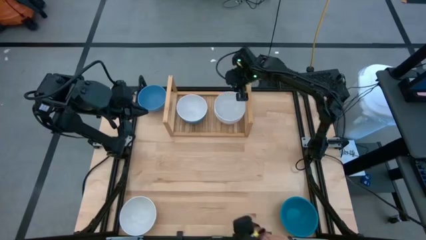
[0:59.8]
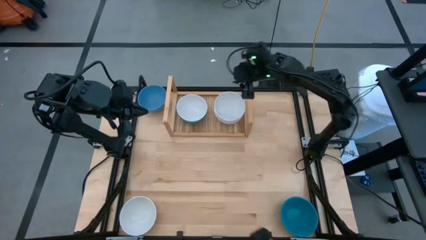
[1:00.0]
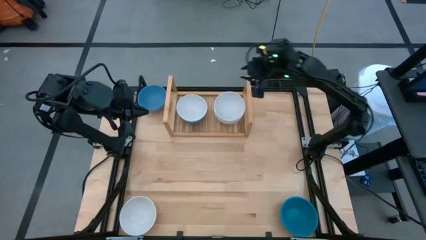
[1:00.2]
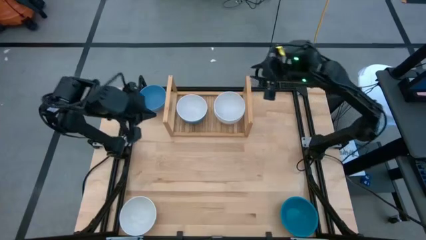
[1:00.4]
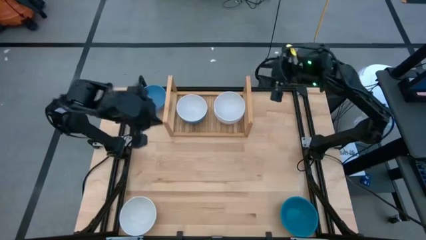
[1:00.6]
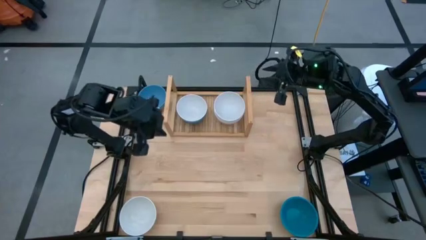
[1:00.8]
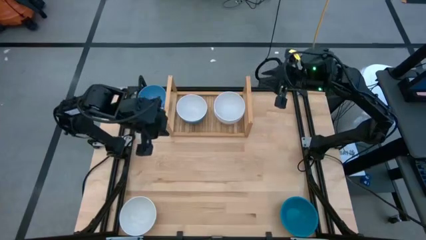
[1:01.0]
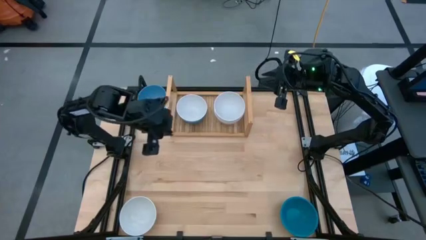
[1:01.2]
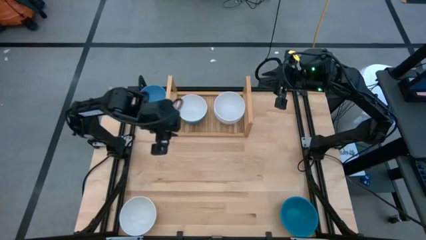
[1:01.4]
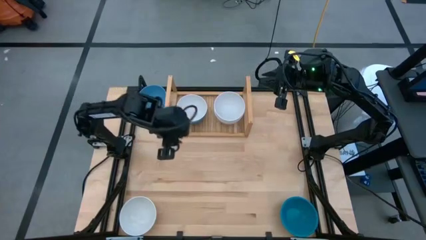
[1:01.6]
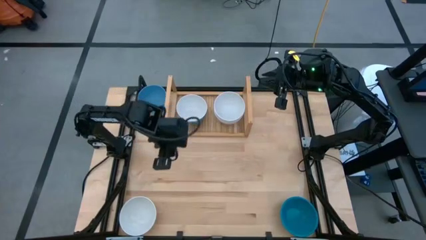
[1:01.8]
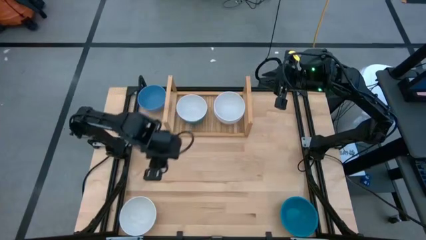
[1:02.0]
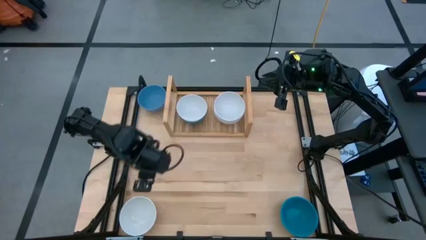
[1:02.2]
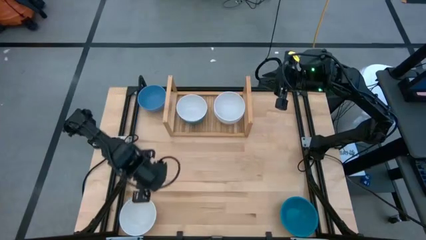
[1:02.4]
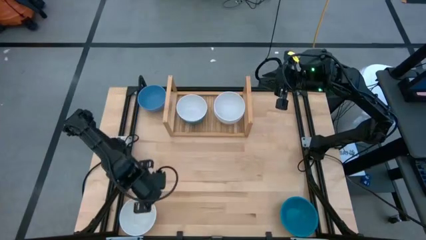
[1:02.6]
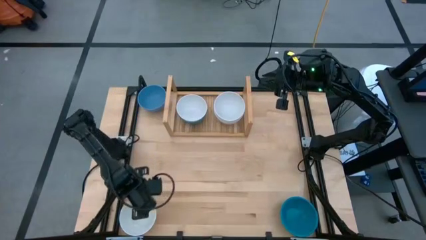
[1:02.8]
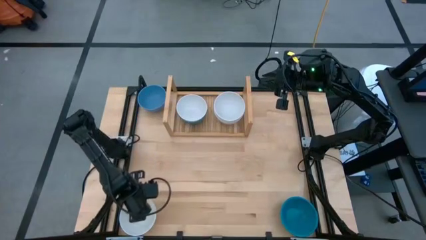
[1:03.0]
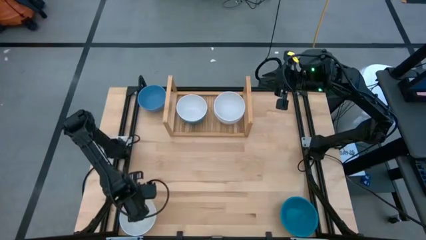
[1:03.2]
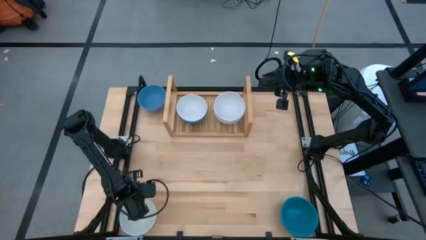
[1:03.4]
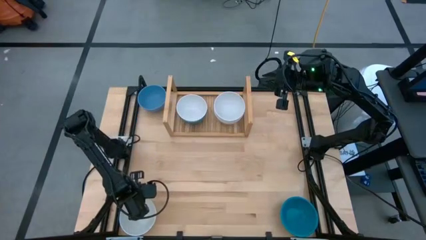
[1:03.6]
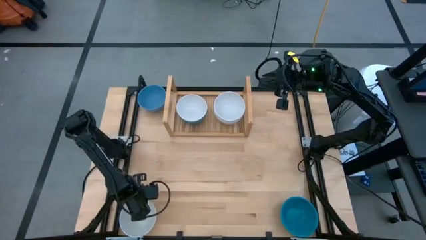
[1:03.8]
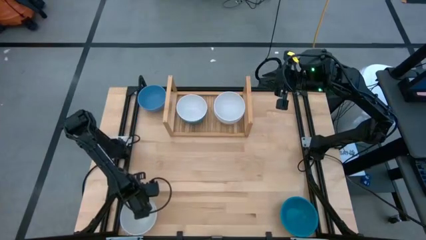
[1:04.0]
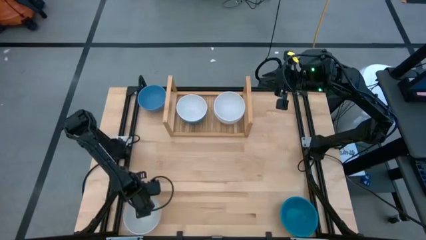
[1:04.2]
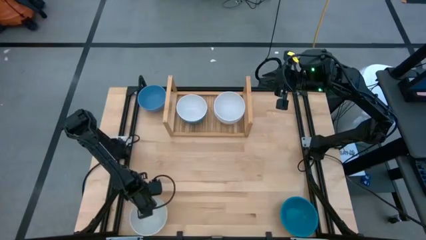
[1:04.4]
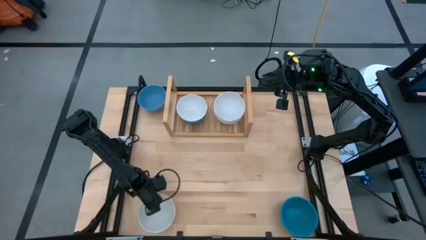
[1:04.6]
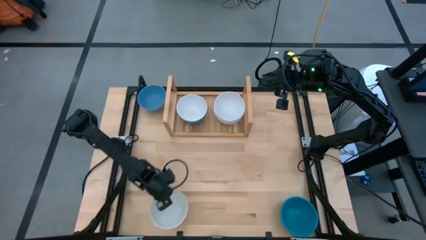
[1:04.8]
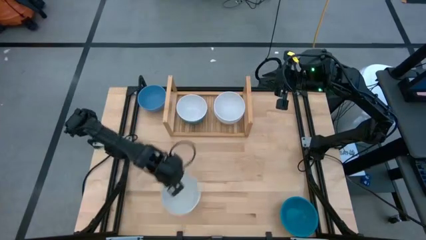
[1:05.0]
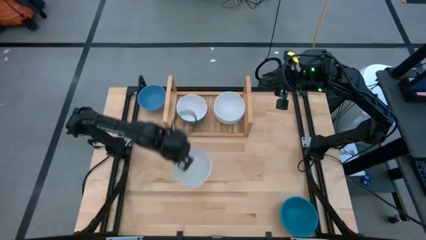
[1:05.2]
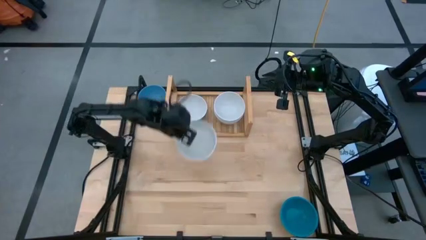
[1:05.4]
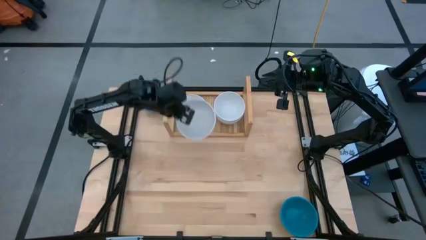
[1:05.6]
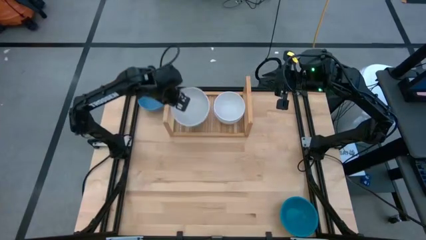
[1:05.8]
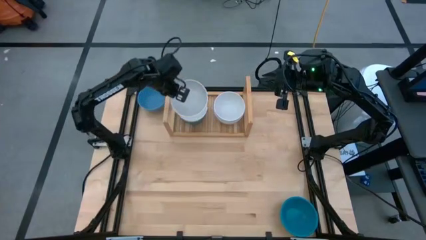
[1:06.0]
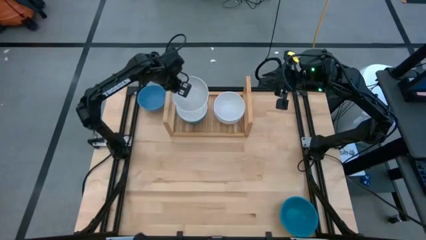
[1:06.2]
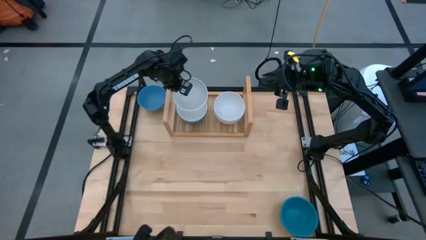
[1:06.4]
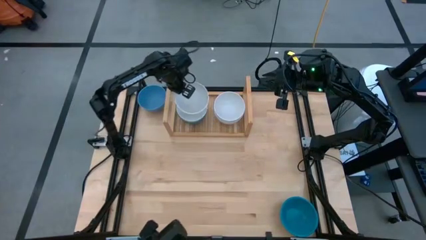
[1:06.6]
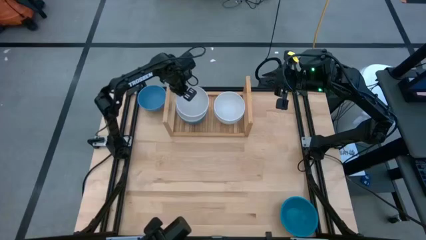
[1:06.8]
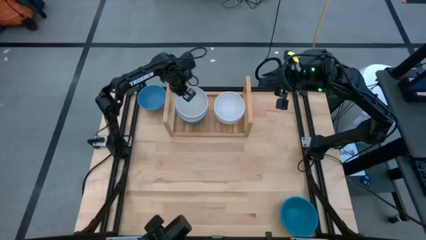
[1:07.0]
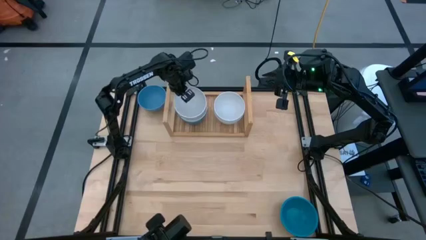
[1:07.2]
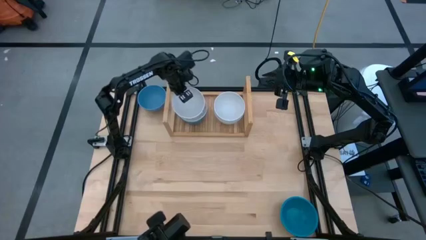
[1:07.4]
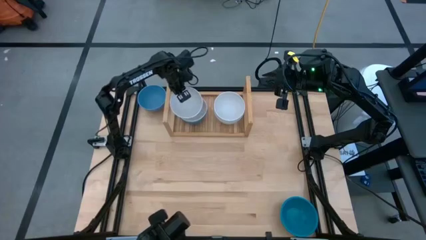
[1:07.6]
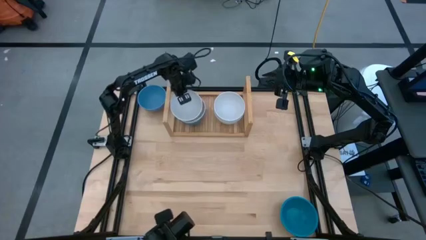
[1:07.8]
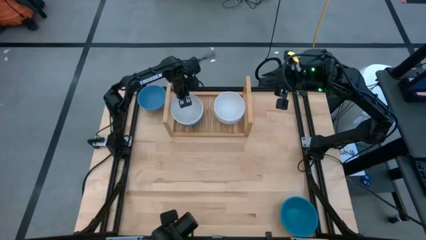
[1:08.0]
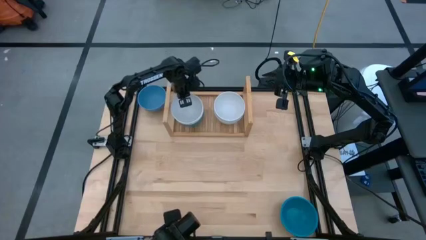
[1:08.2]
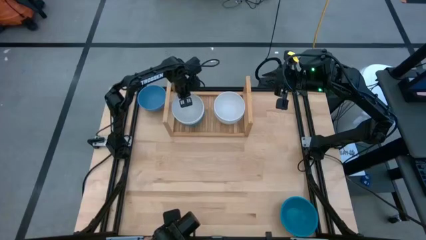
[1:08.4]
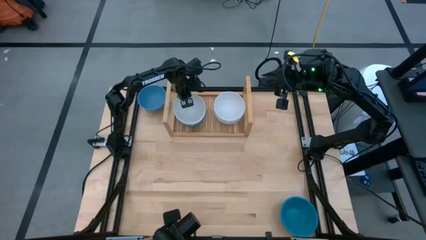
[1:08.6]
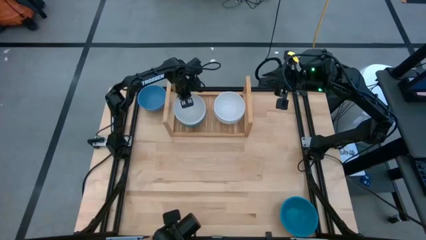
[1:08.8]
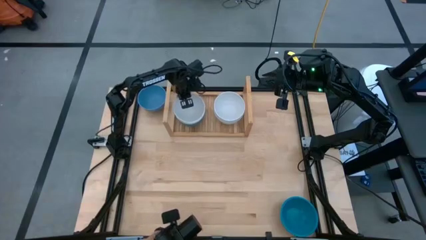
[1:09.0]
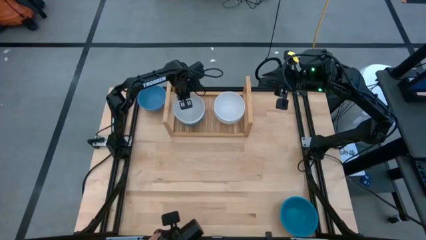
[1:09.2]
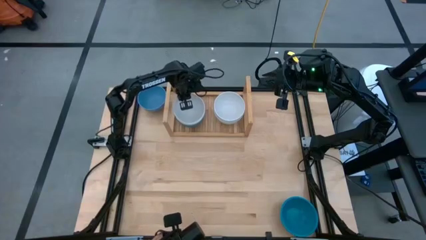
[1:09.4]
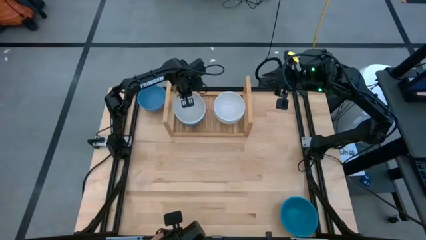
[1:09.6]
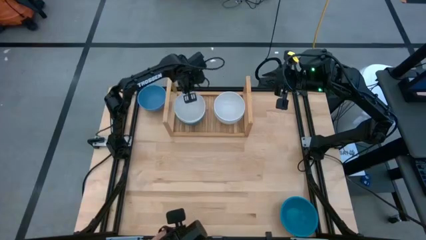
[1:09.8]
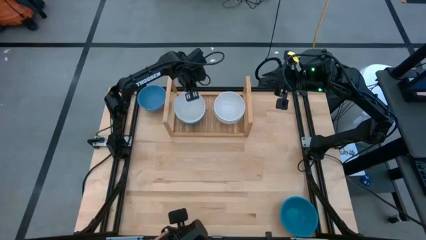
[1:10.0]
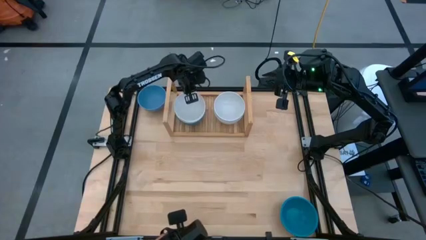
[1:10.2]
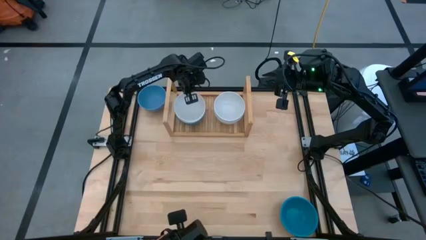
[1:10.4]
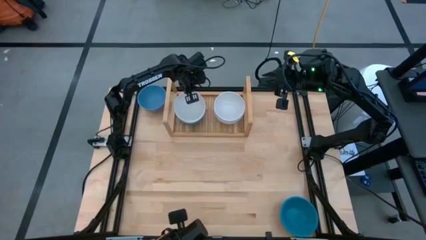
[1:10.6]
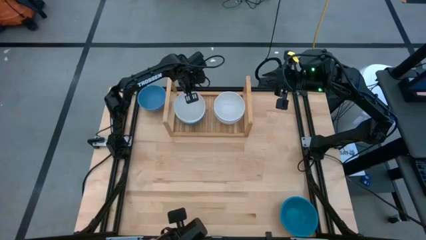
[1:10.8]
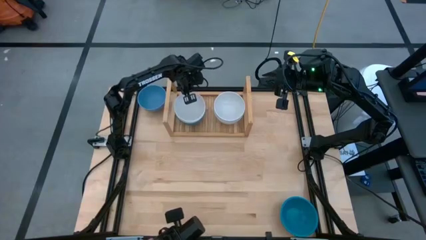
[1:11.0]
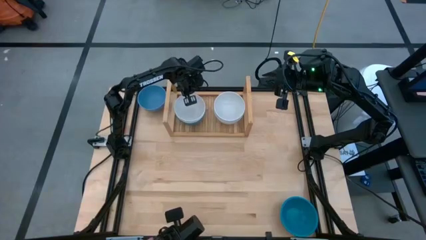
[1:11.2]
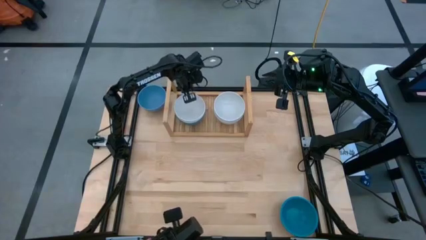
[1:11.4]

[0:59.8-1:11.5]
Task: Place and stack bowls onto a shelf
Stack the white bowl on top of the white bowl on the shelf

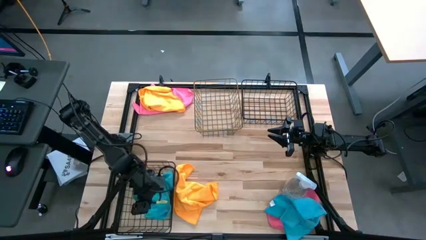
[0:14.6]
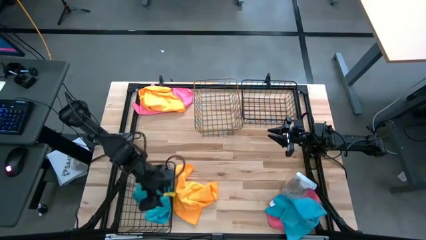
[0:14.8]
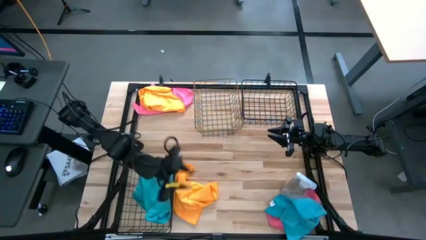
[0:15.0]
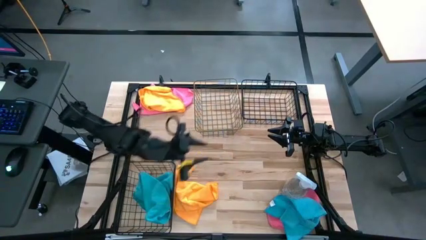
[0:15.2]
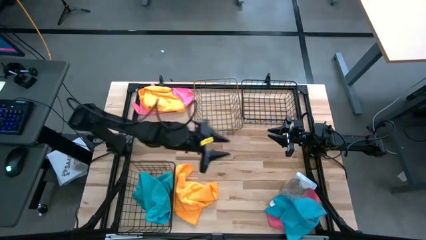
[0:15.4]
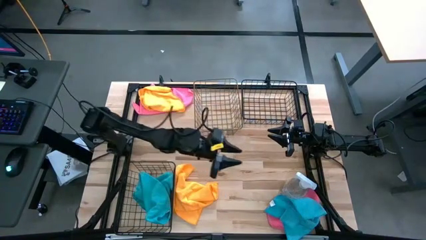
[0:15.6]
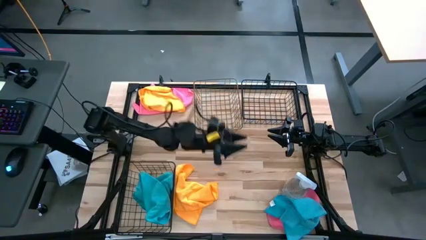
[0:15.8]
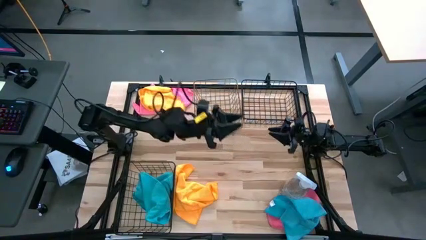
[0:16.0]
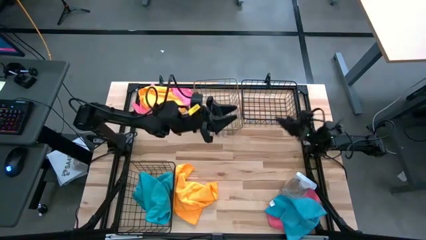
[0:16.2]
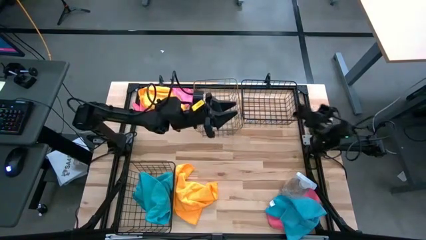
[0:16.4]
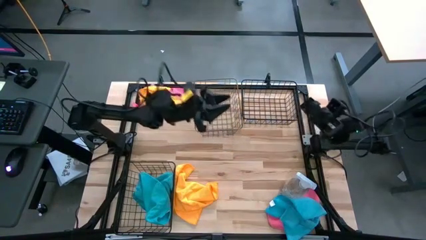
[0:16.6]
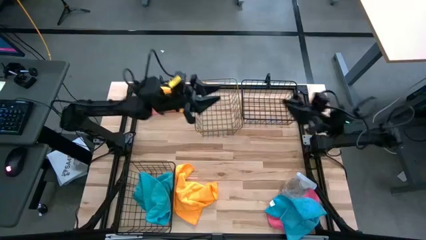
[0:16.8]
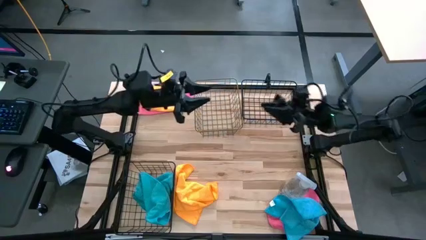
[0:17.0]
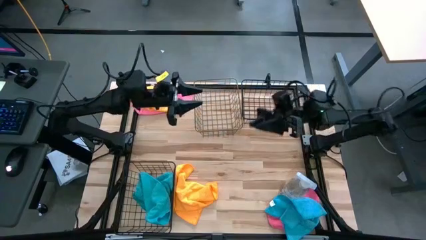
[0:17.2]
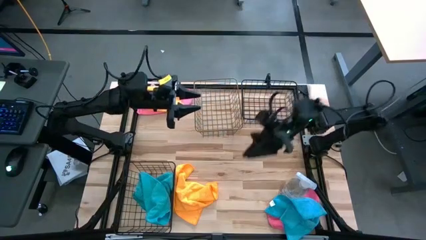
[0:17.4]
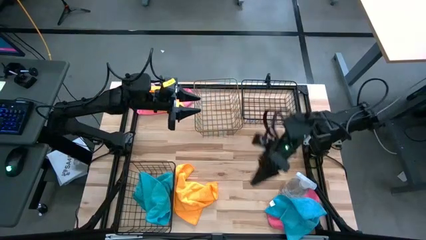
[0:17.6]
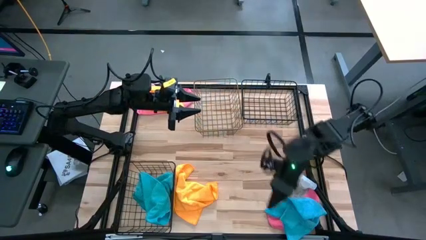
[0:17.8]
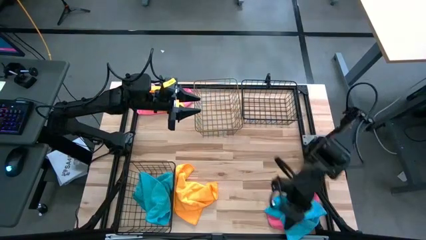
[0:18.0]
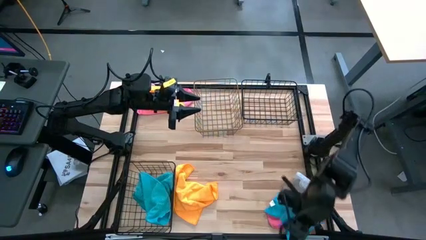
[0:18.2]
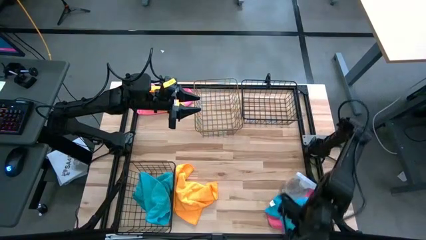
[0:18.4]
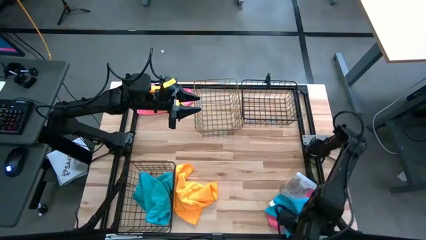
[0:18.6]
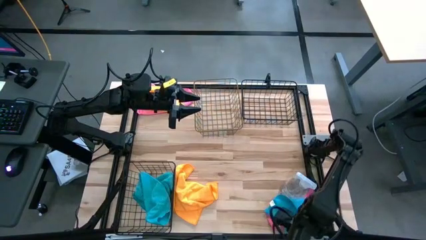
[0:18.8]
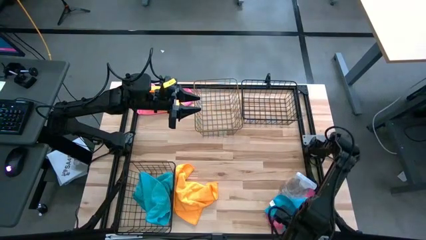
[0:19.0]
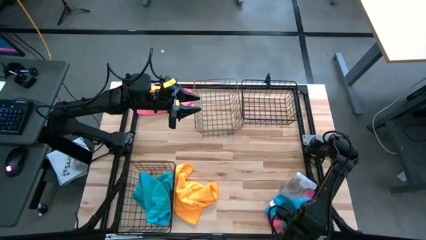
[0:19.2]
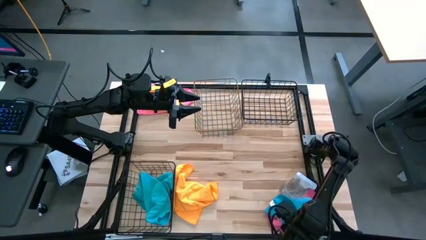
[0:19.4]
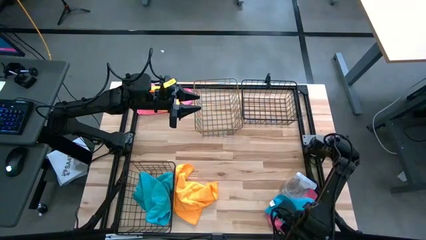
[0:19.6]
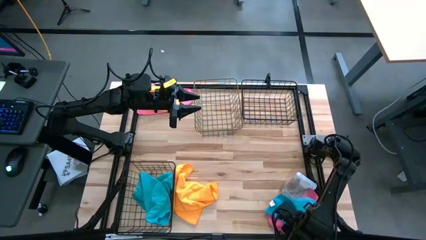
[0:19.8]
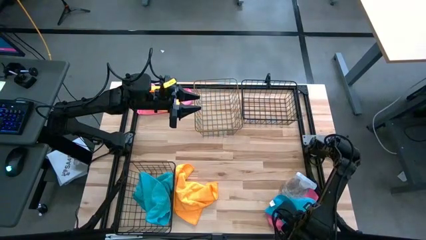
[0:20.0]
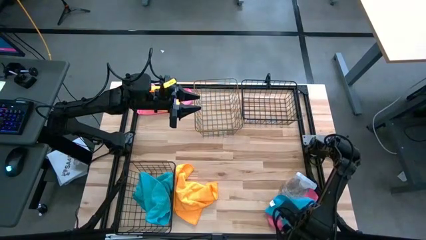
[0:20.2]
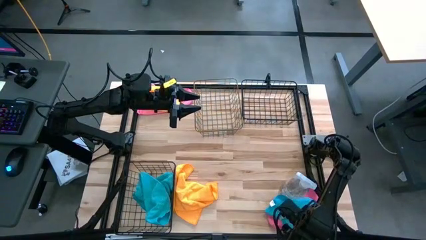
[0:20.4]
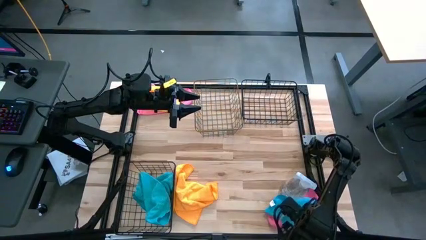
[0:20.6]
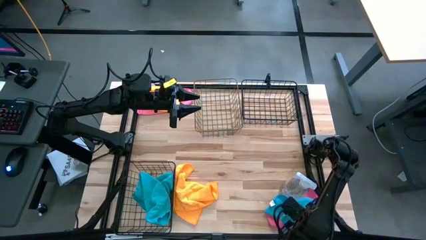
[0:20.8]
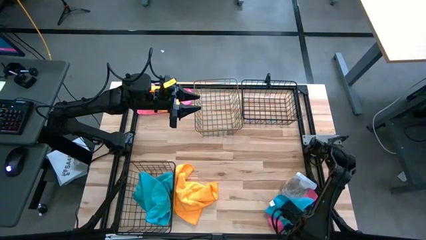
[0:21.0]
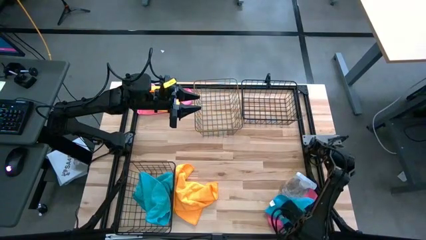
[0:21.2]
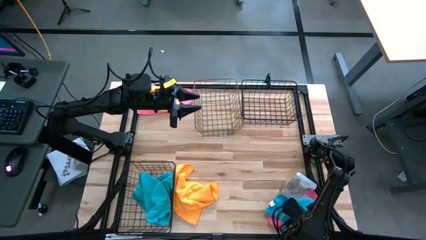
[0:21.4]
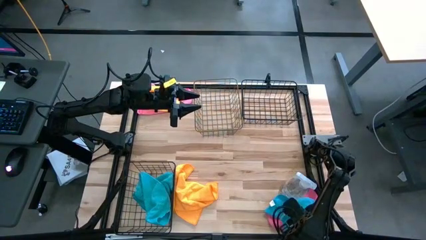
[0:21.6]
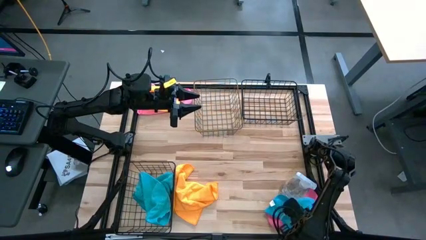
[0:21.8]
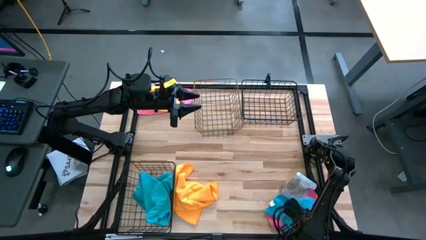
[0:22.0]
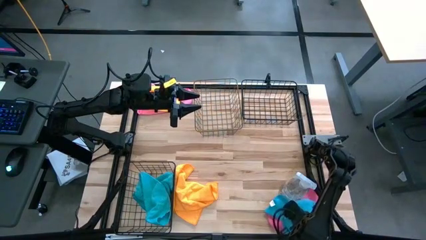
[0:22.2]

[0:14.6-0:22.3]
Task: Sort microfiber towel by color & place in baskets
Put the blue towel into the bottom black wire basket
